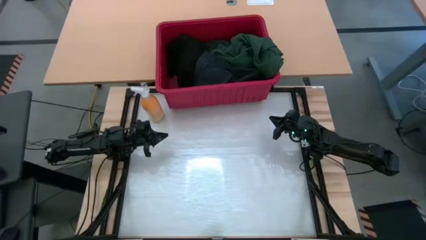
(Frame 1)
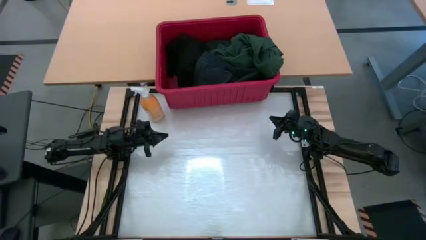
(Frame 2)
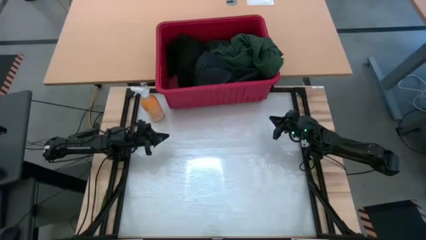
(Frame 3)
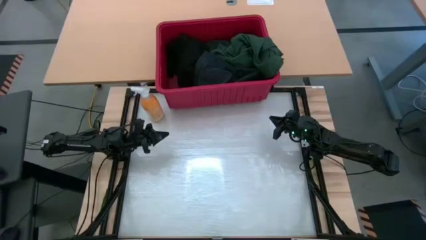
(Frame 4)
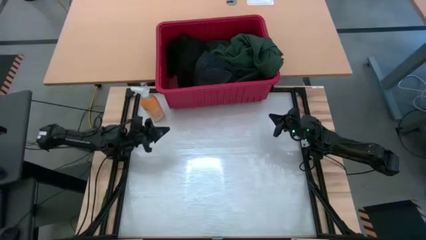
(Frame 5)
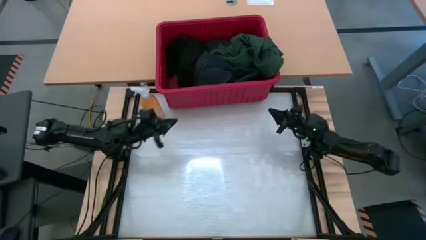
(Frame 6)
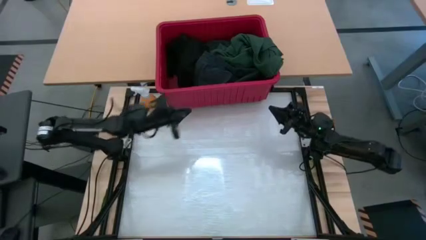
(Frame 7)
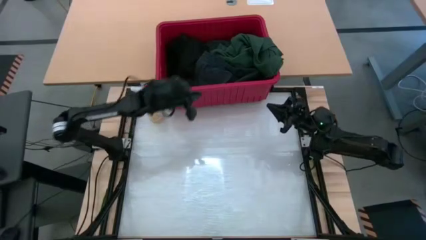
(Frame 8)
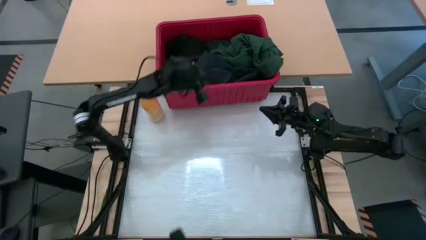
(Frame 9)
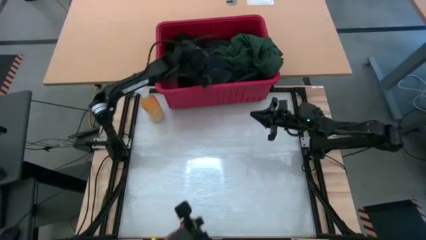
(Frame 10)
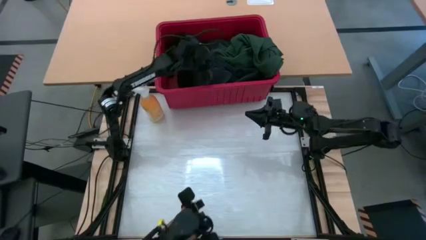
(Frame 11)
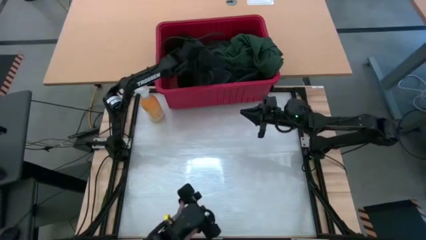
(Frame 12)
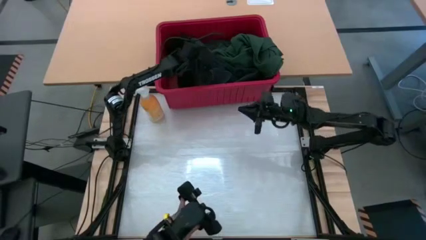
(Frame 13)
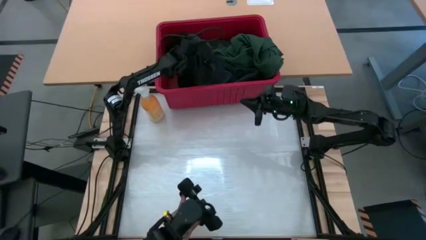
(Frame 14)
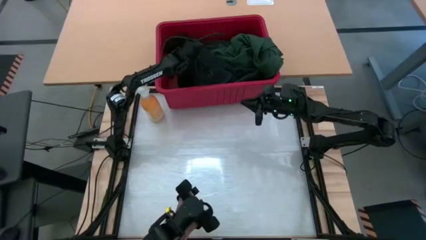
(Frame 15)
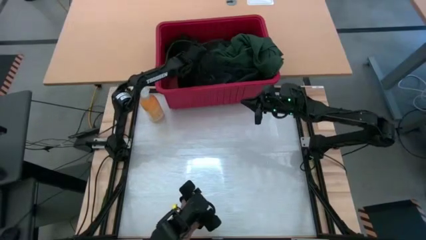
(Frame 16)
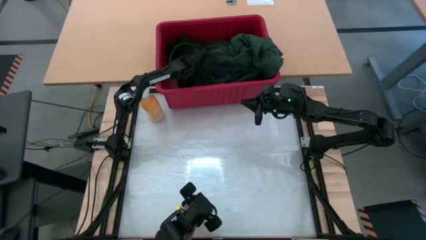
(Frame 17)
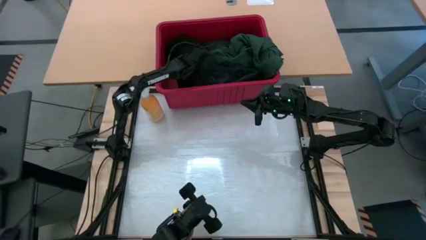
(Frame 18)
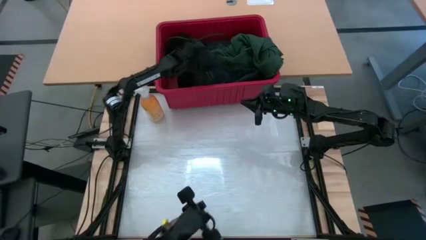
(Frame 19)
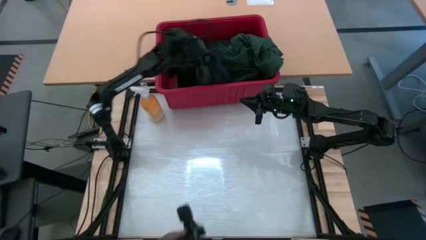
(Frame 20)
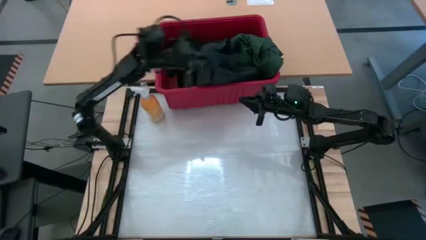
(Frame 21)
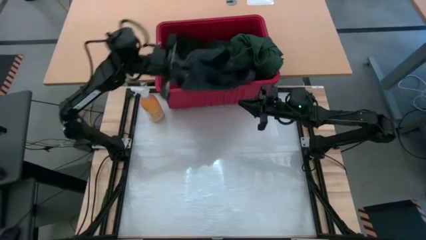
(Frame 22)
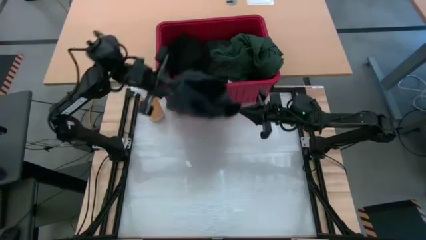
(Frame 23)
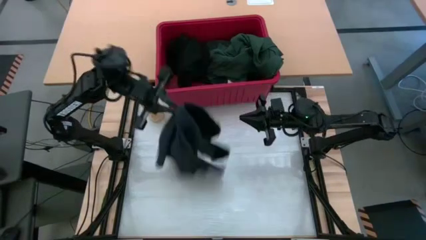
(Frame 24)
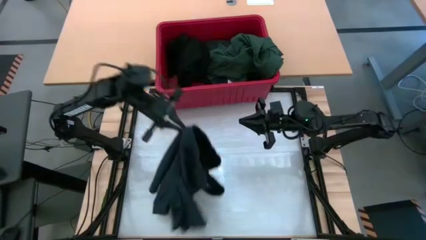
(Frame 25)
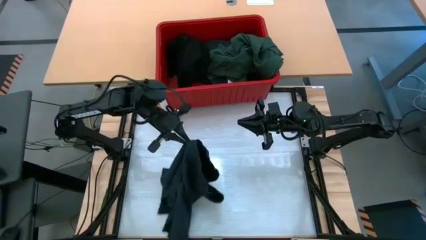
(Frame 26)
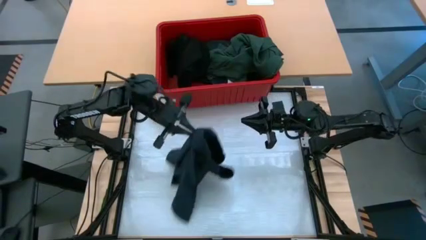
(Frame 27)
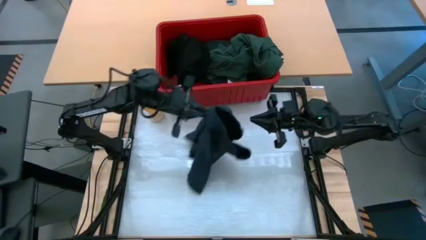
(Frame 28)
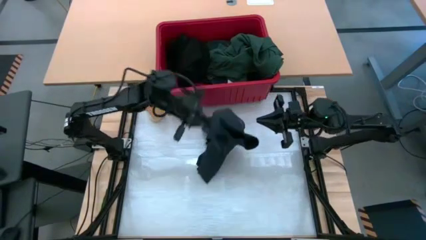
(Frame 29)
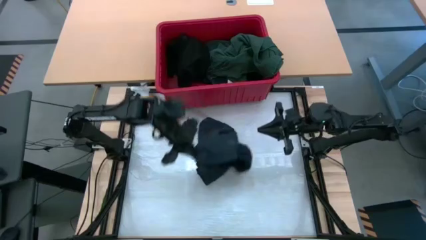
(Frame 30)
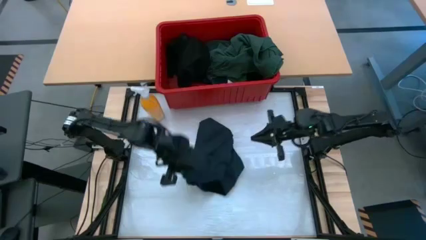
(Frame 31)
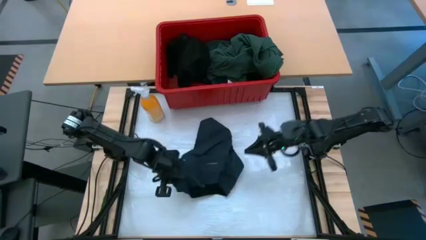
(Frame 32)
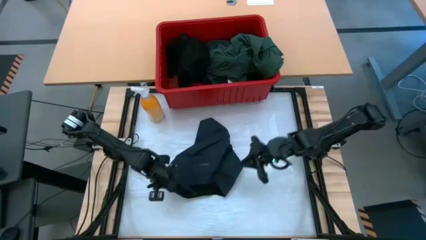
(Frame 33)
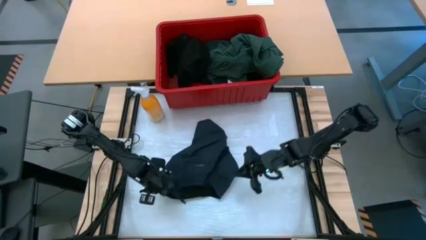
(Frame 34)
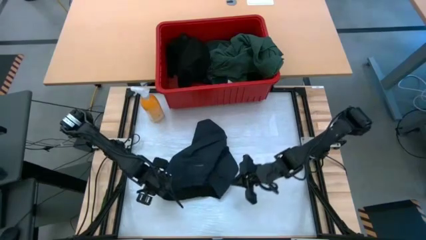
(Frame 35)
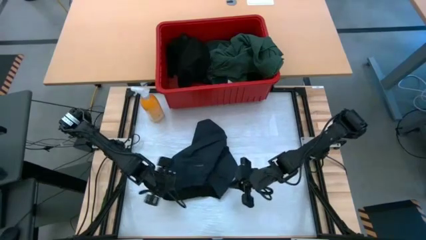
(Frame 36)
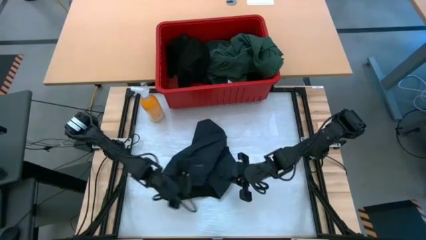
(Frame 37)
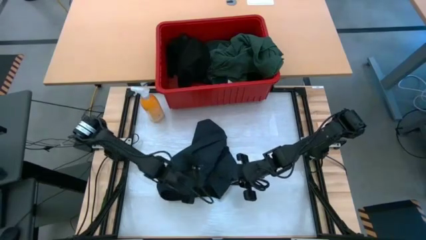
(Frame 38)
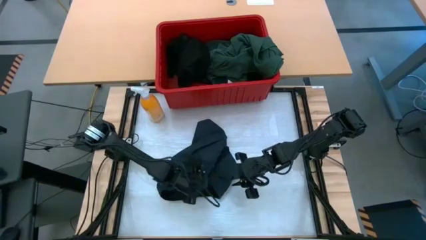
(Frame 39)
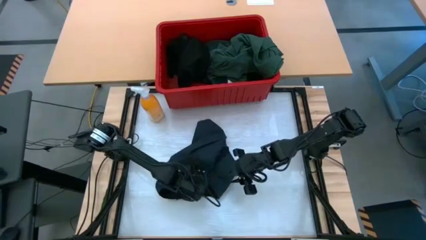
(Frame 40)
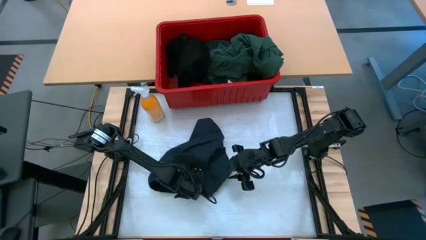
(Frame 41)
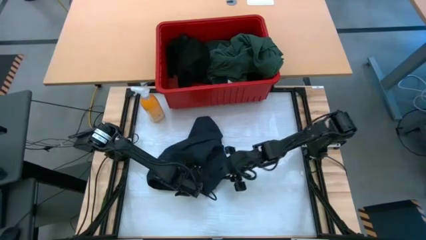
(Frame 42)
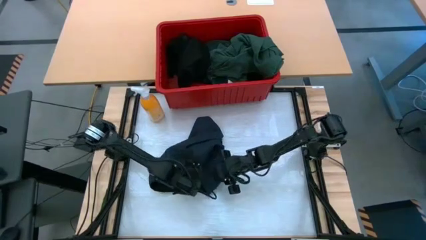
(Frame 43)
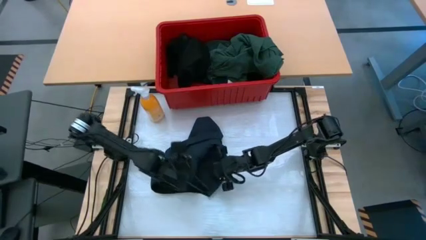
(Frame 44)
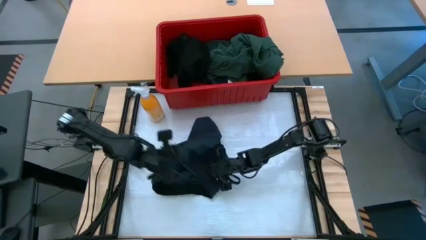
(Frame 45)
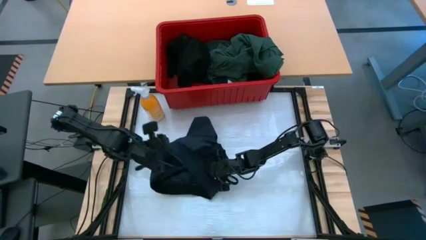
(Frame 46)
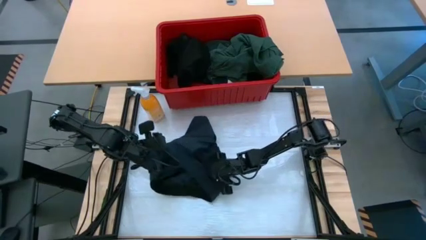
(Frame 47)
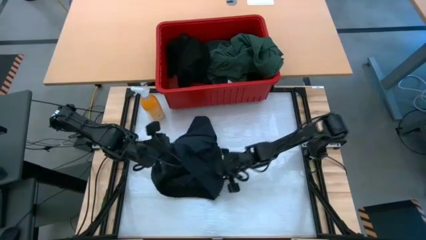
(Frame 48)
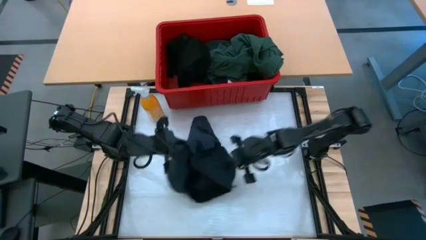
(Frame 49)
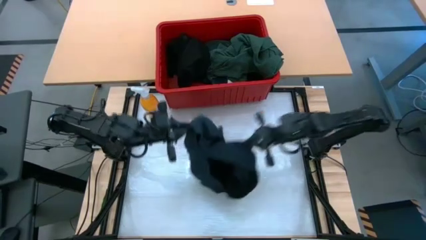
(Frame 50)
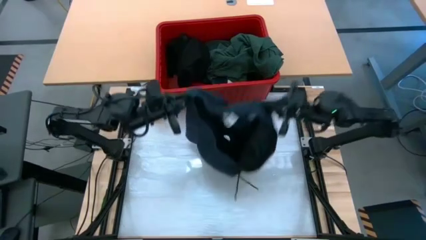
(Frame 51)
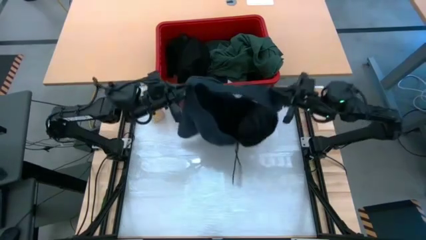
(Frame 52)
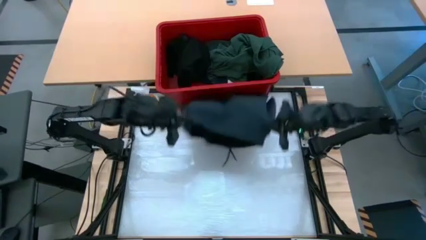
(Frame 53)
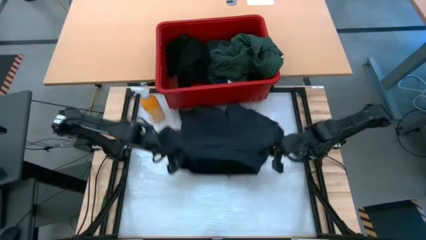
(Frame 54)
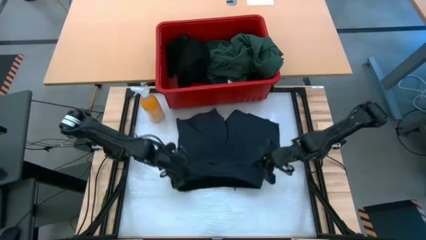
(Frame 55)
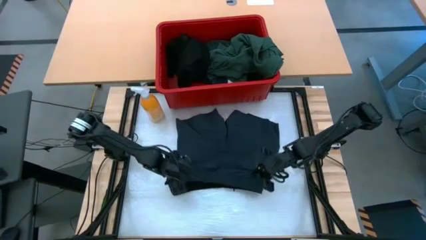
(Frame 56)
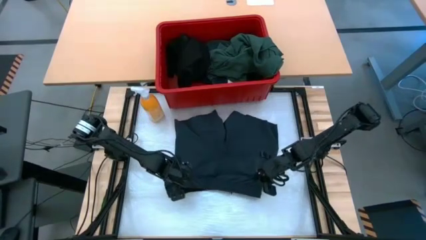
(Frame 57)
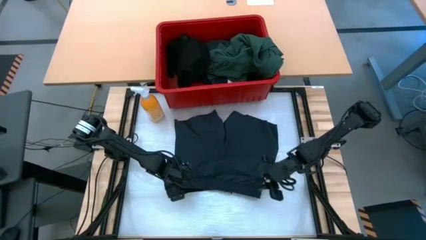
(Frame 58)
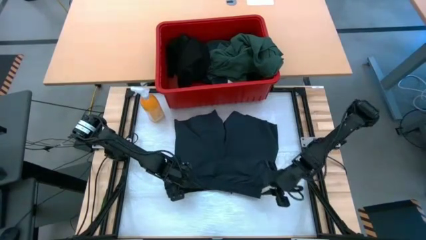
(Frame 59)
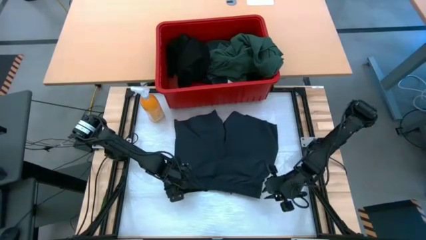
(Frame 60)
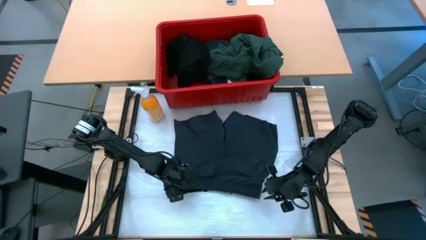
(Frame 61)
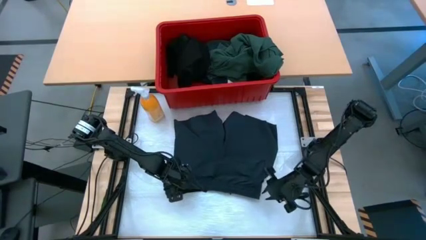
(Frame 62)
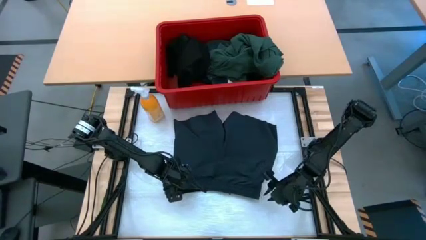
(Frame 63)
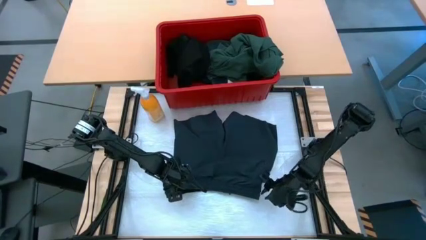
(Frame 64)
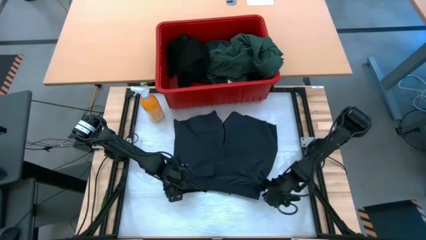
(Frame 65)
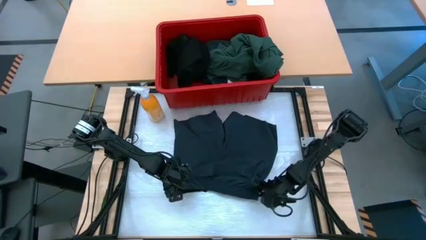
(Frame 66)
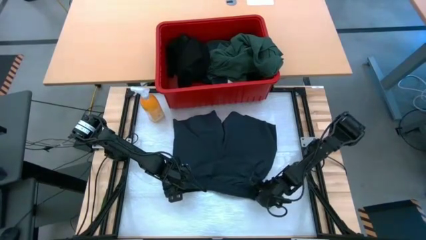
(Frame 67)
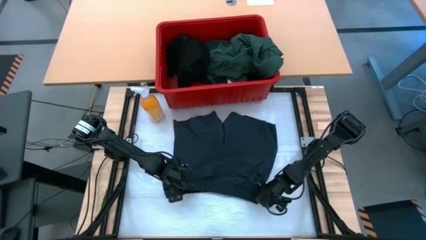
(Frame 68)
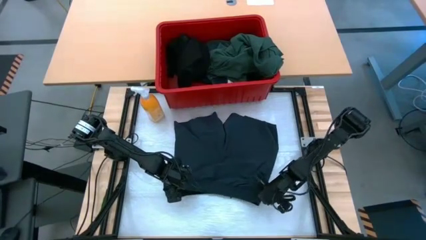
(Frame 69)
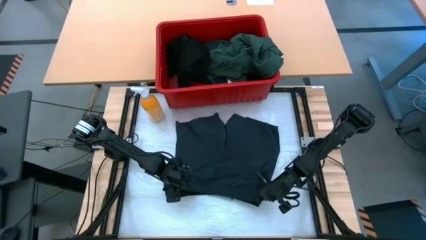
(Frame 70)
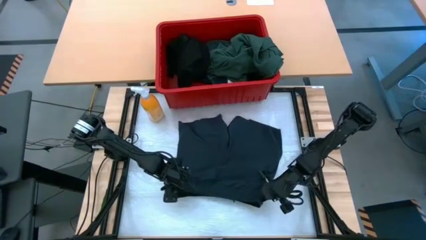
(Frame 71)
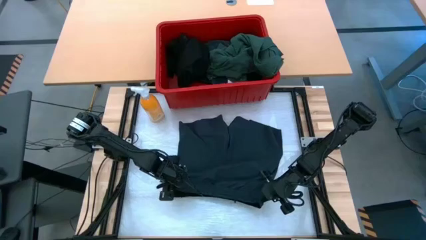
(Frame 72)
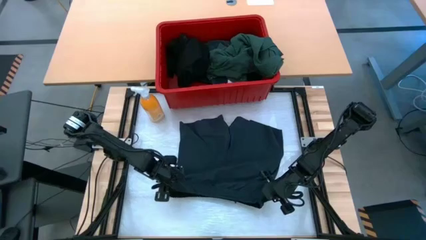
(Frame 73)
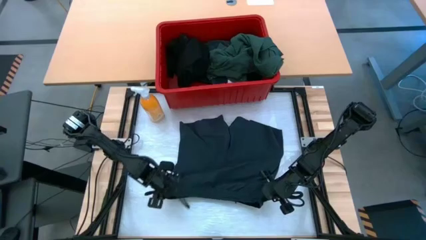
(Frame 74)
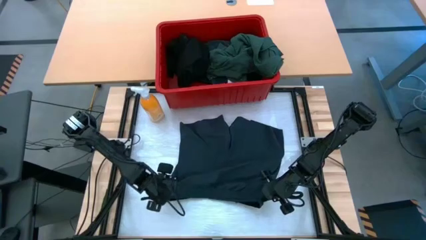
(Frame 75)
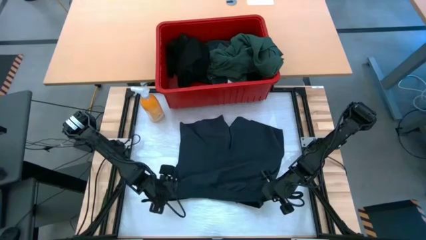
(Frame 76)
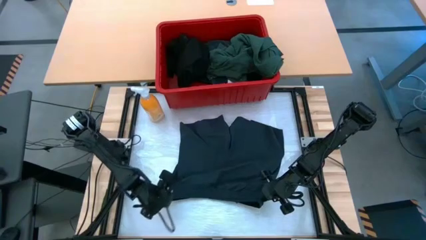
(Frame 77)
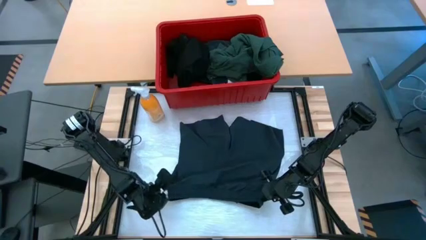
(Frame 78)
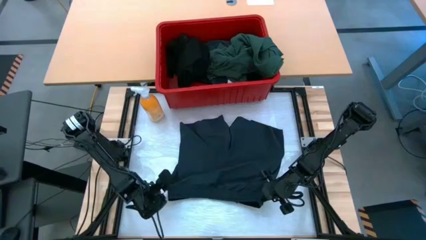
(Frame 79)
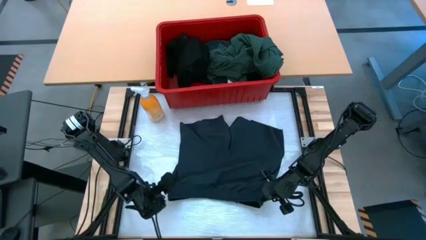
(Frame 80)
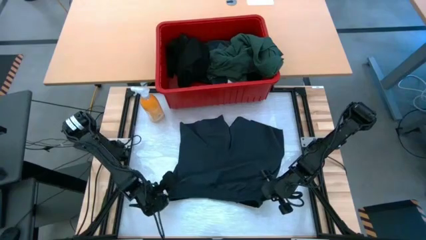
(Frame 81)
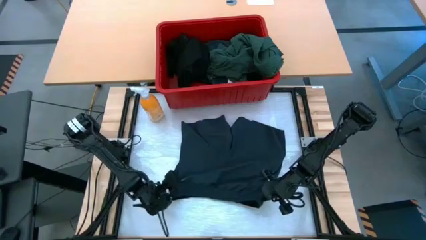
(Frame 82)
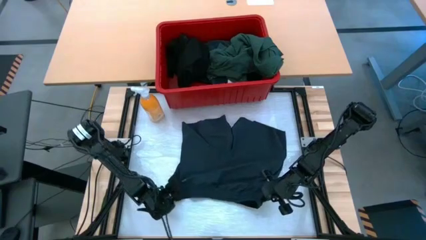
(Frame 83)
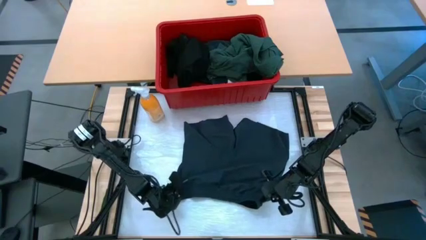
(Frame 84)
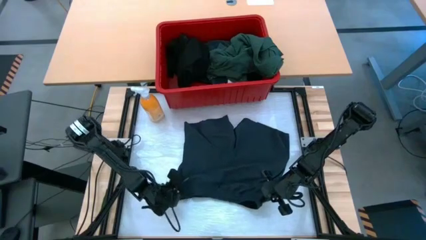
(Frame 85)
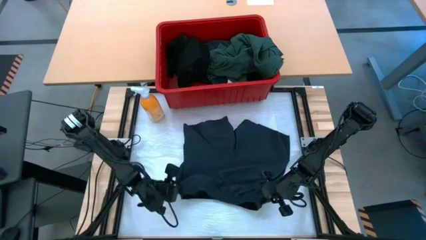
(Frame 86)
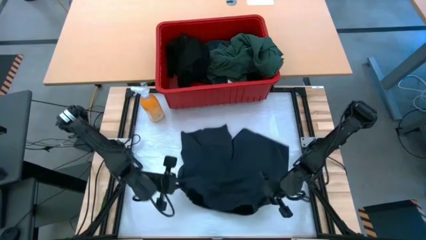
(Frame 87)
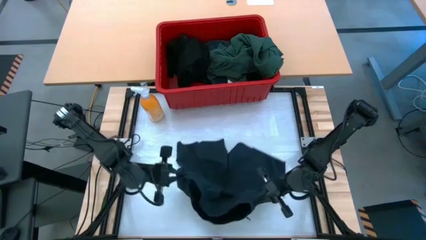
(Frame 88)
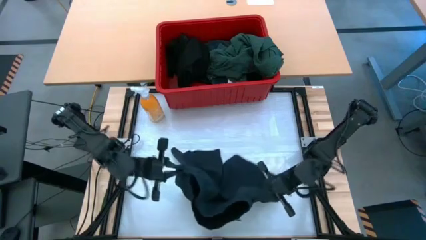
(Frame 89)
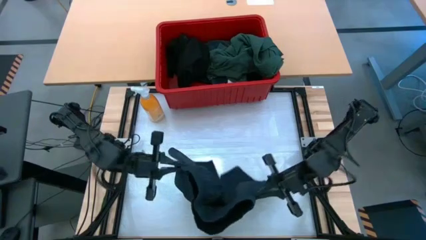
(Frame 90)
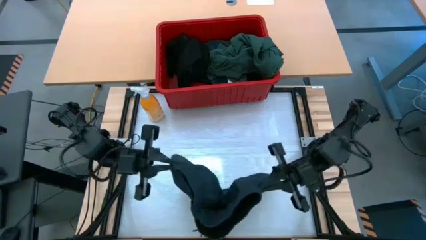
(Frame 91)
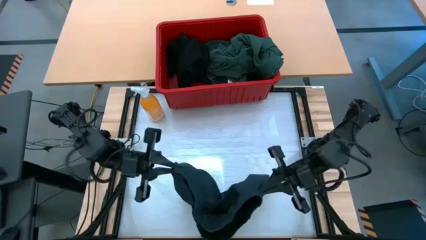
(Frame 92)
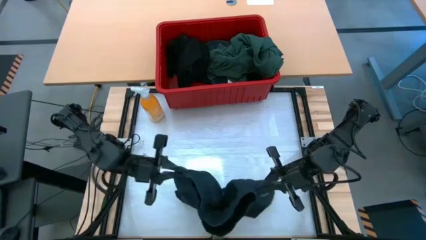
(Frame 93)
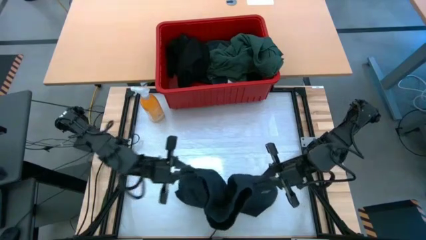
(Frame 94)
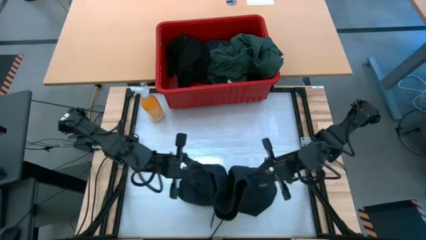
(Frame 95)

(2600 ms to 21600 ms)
Task: Fold Laundry from Bin
Fold the black shorts from the red laundry bin
